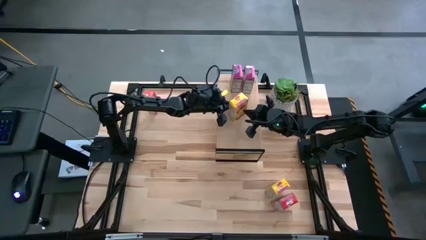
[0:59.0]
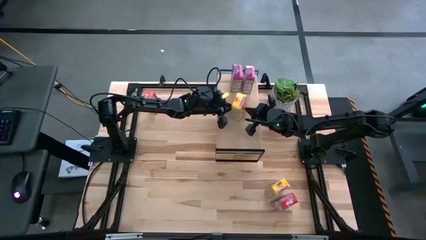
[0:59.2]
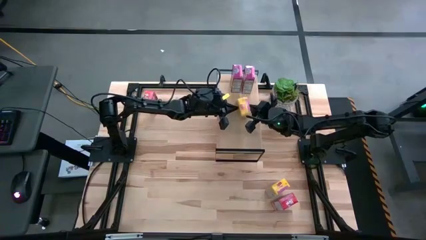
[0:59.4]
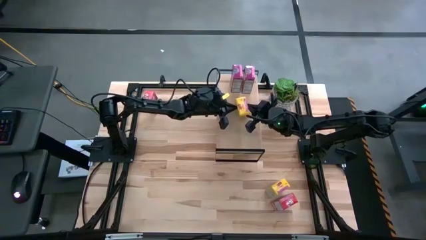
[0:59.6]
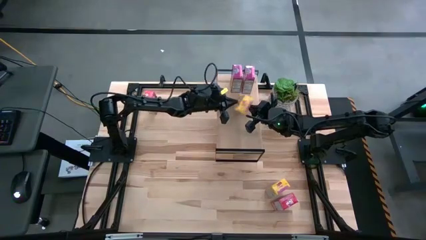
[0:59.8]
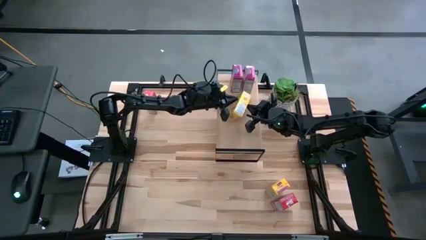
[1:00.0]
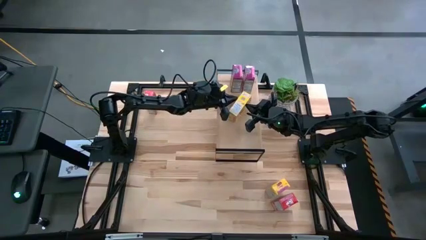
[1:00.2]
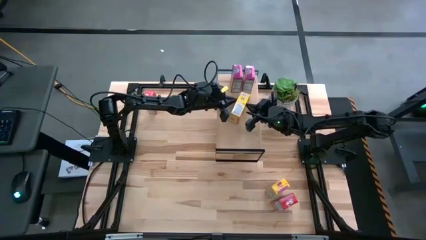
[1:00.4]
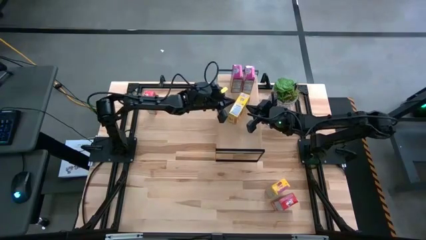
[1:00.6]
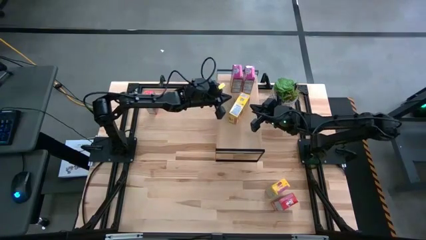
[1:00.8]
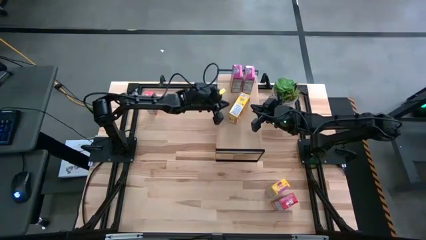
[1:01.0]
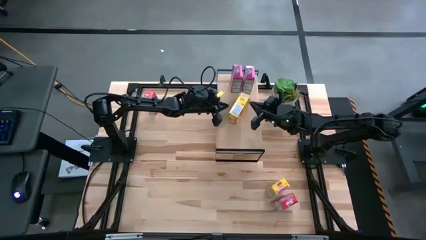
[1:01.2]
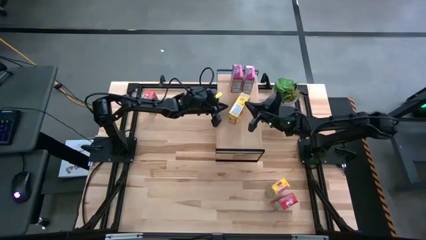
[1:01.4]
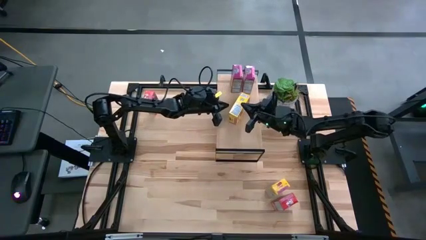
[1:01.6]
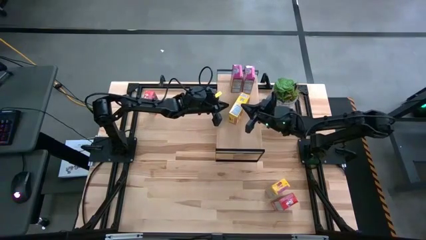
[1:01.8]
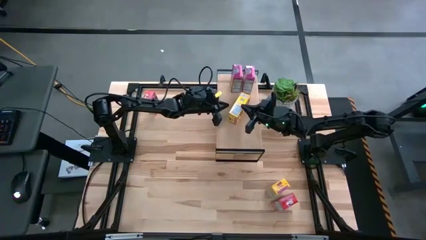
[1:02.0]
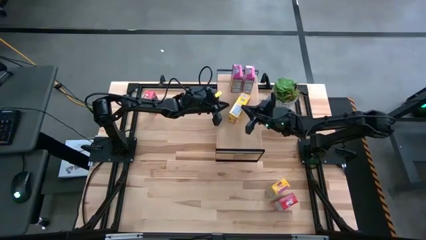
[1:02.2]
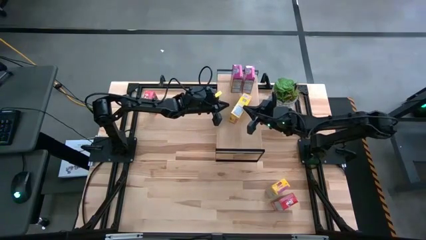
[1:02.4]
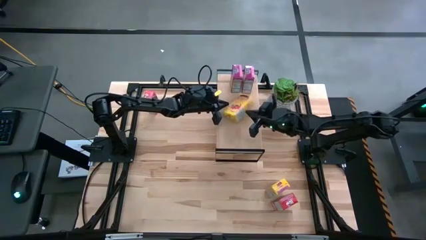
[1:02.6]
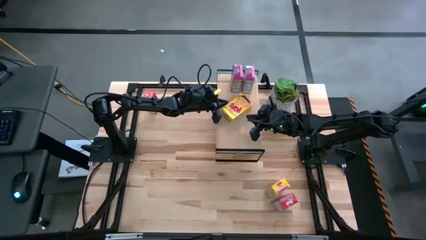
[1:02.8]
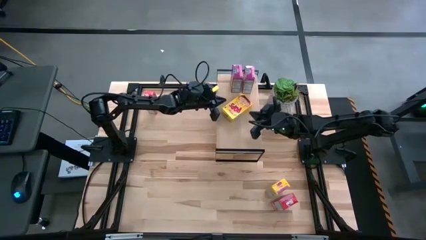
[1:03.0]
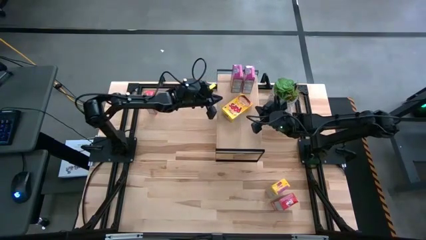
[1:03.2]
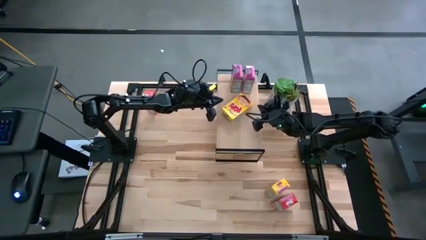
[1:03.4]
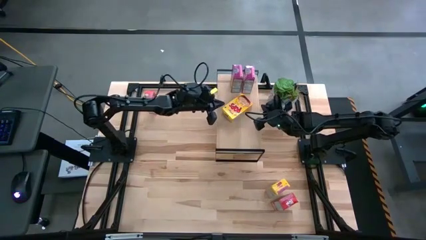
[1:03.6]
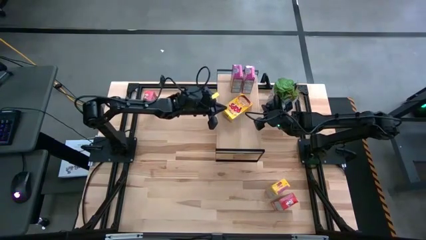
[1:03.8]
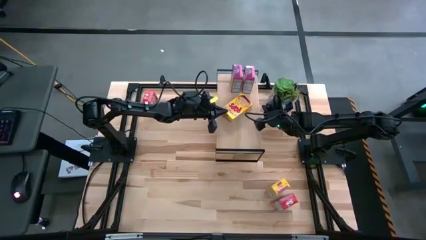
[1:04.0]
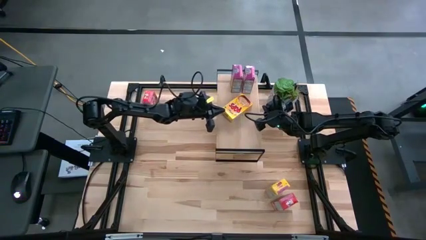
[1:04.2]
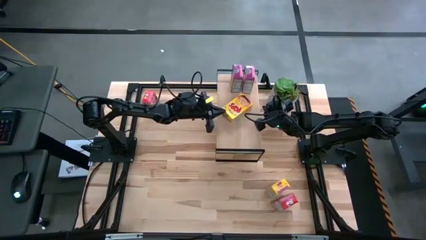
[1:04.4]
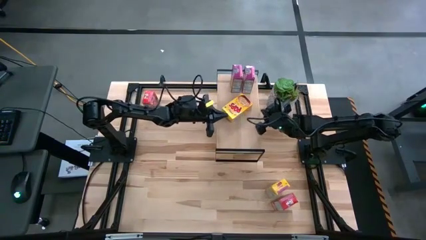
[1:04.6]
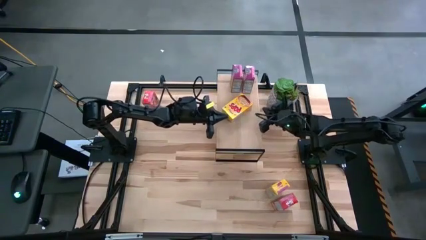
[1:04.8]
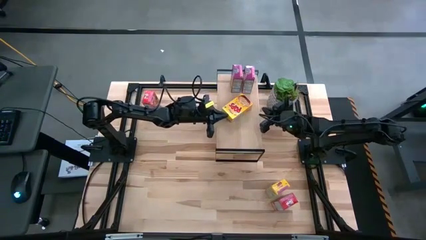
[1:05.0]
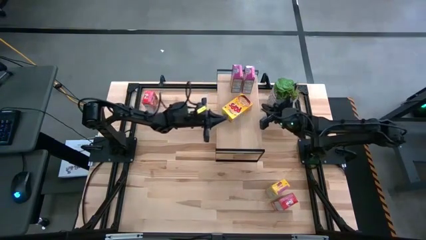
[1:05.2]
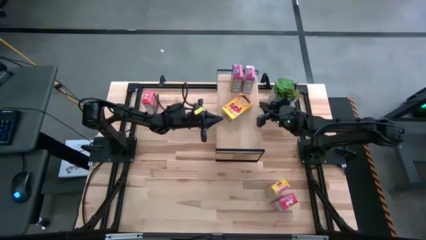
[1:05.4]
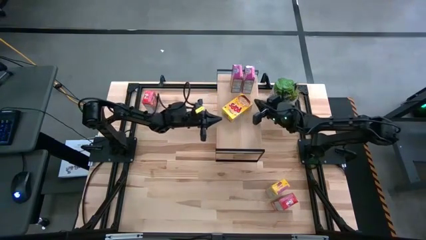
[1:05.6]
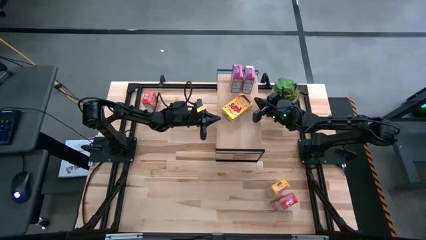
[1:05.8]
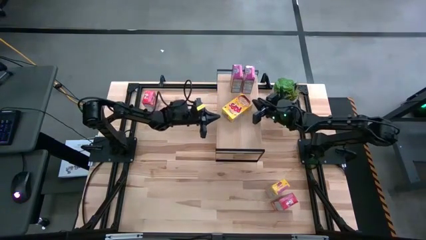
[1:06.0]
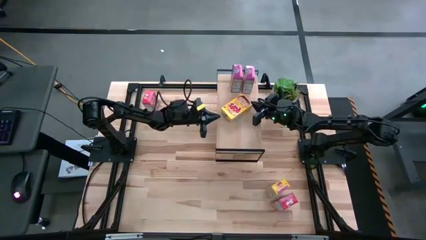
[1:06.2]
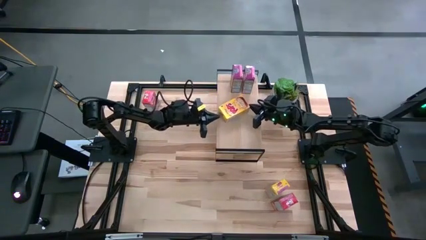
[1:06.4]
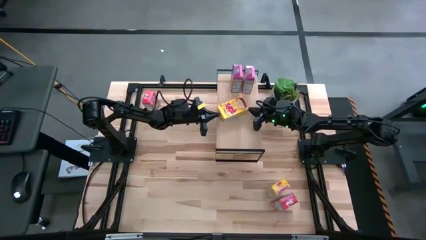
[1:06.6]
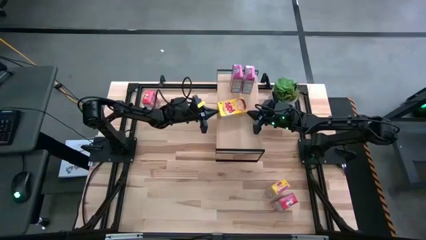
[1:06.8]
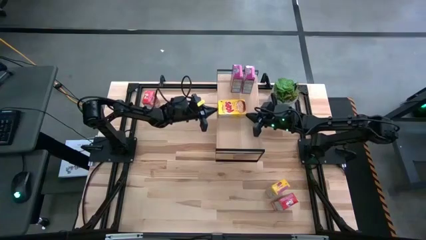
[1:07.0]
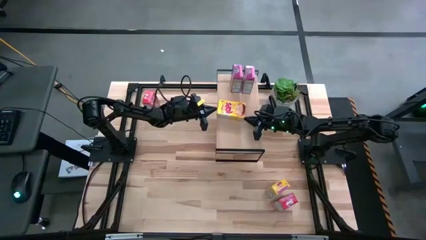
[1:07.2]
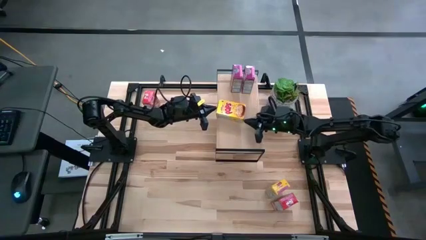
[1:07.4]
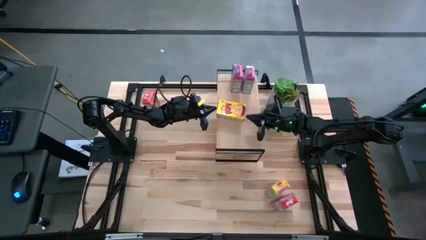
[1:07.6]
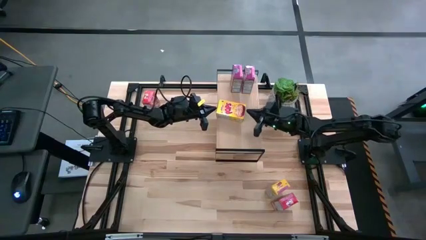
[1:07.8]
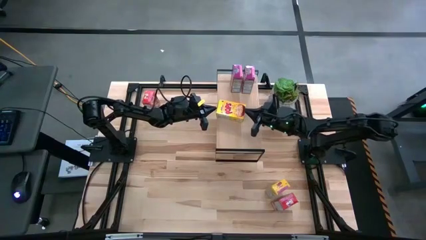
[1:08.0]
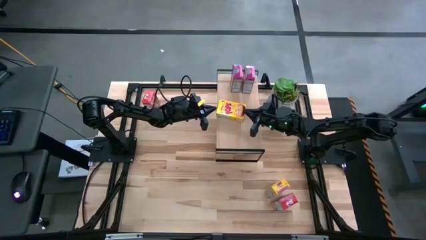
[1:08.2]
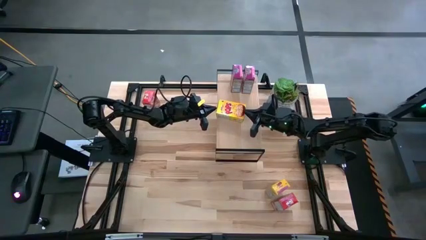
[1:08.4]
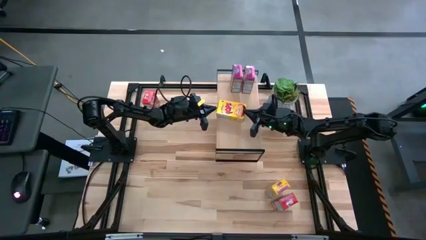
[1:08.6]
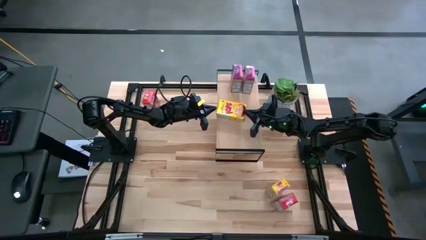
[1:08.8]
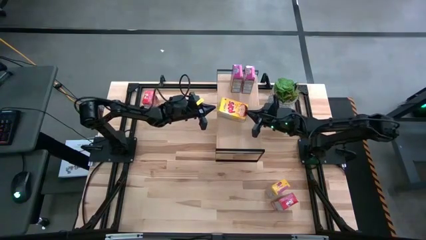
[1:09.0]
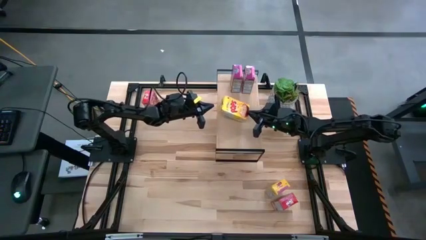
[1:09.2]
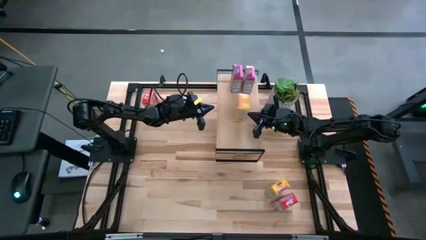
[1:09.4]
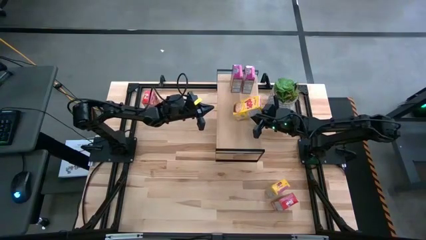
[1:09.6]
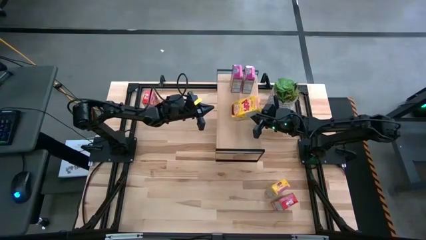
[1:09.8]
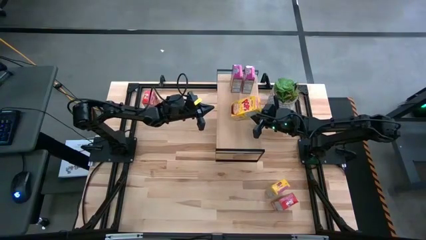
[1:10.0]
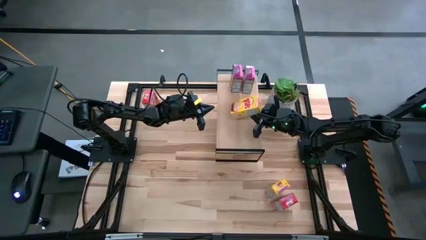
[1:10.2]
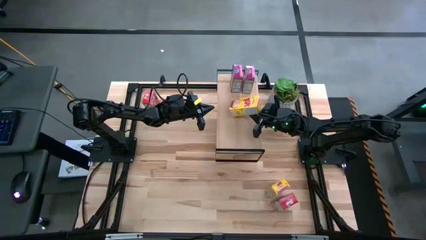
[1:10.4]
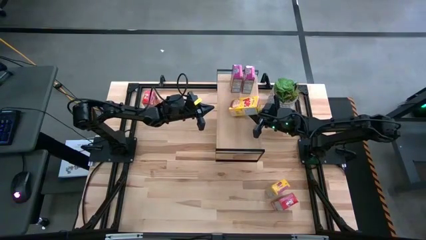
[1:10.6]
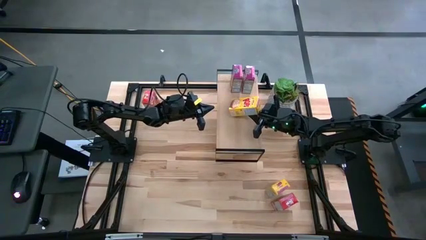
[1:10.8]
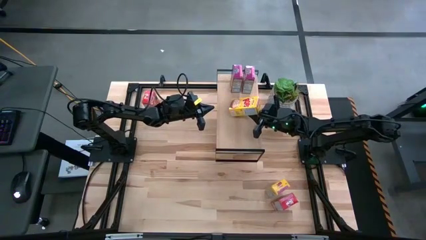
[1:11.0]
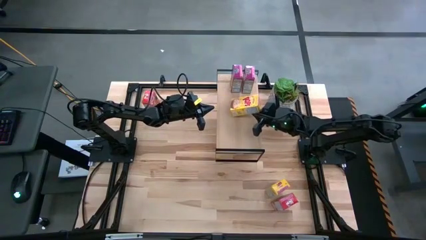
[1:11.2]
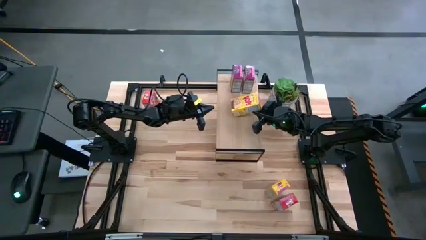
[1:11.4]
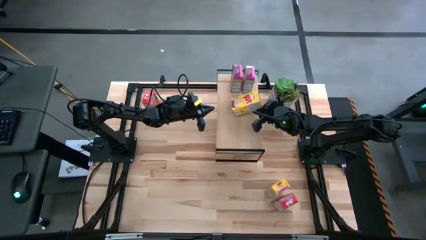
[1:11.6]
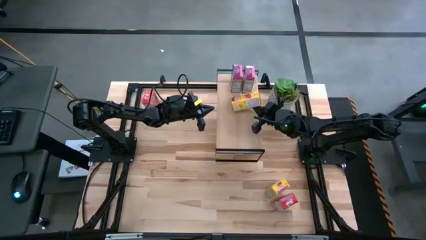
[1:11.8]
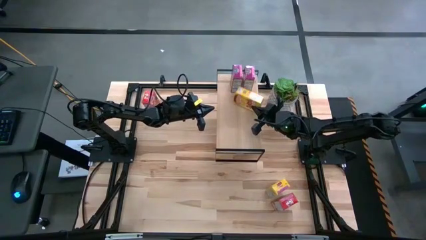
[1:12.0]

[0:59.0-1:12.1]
Task: Stack cereal on shelf
Put the top yellow cereal box on the shelf
